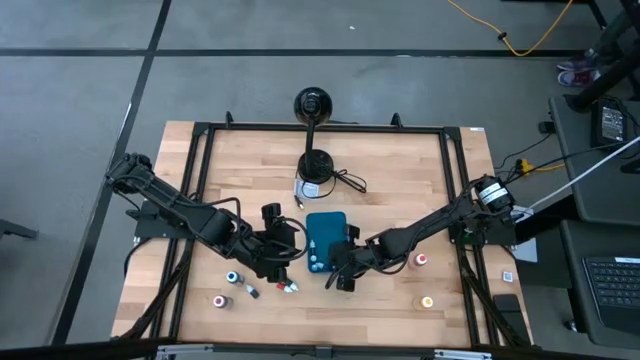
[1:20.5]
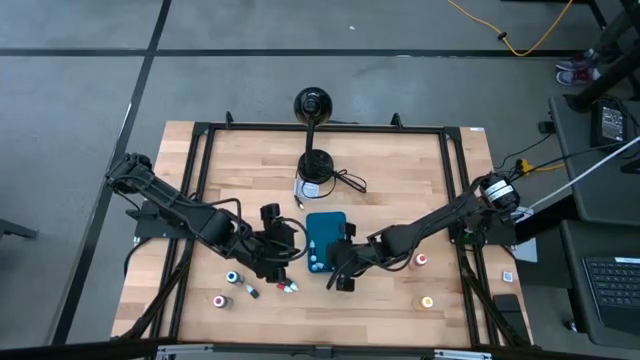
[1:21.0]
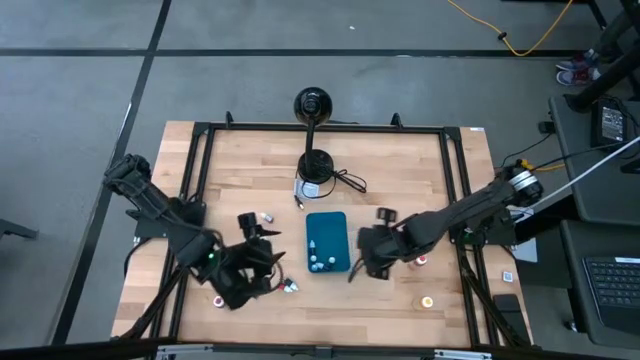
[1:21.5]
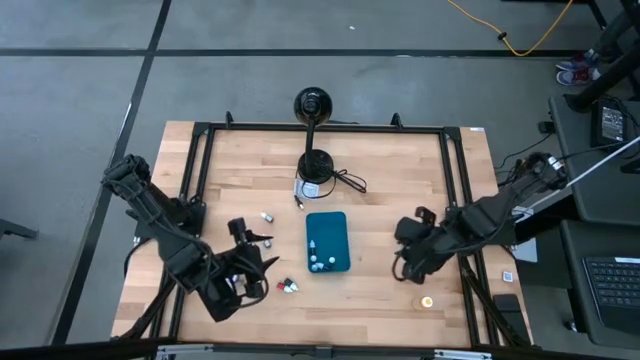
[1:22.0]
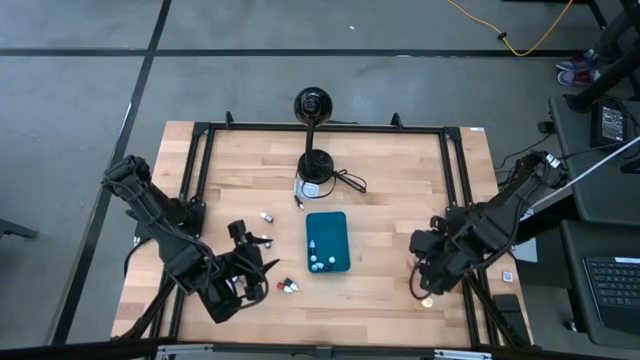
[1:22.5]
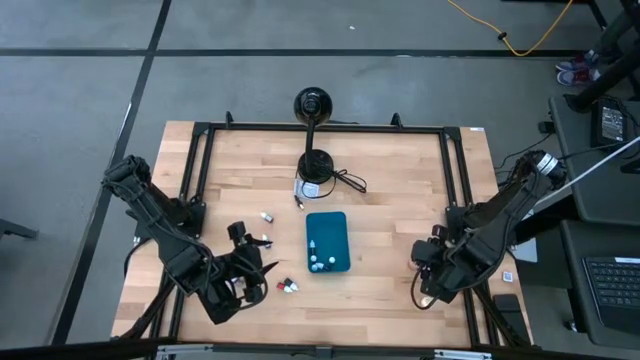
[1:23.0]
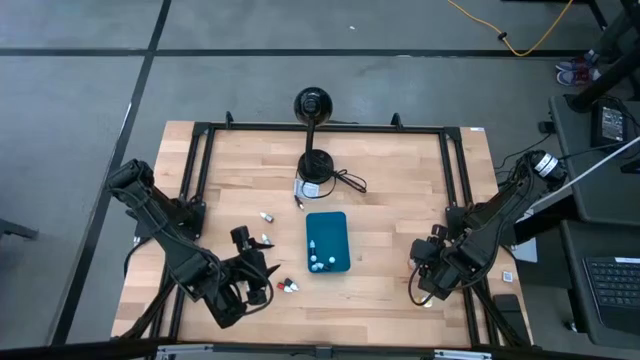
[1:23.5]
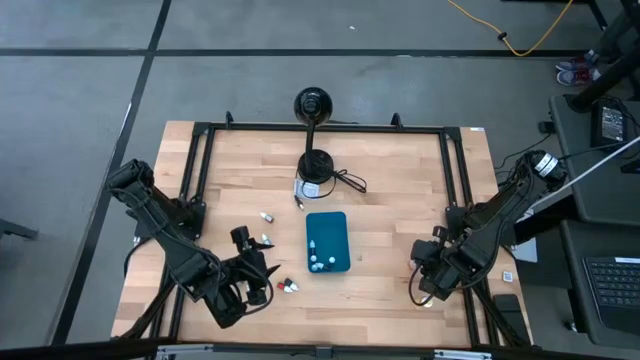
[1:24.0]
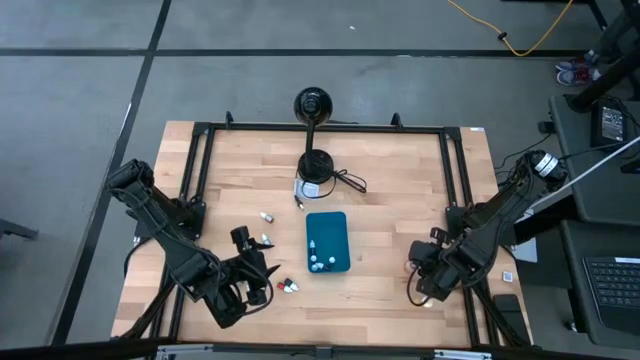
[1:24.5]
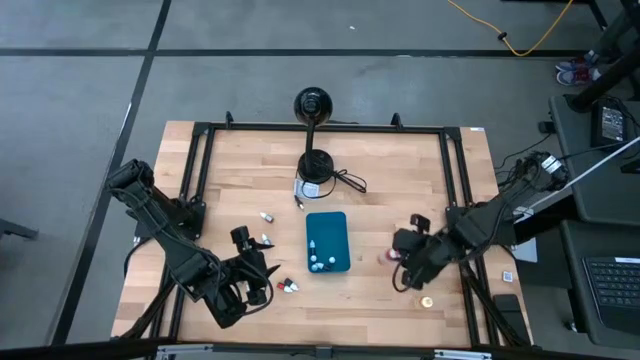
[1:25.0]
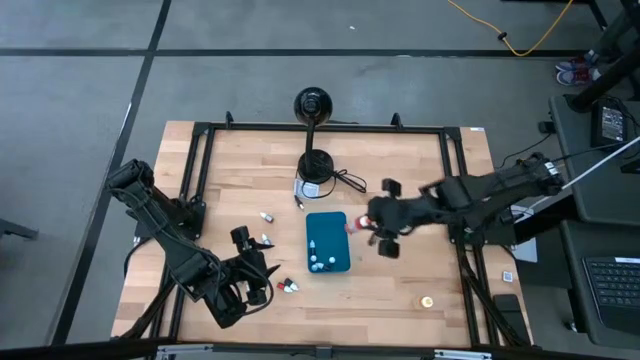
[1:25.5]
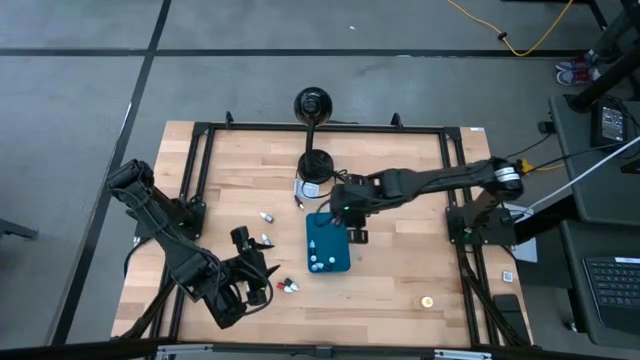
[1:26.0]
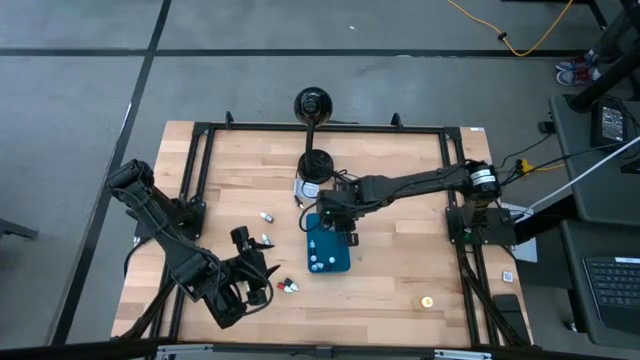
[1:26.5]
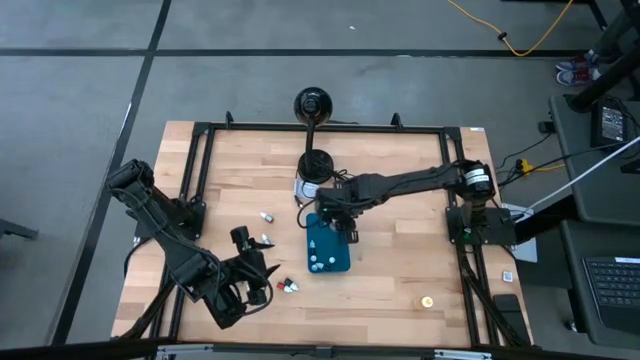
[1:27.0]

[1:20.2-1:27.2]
Task: Pick & Place food coloring
Put the orange big food coloring bottle into the bin

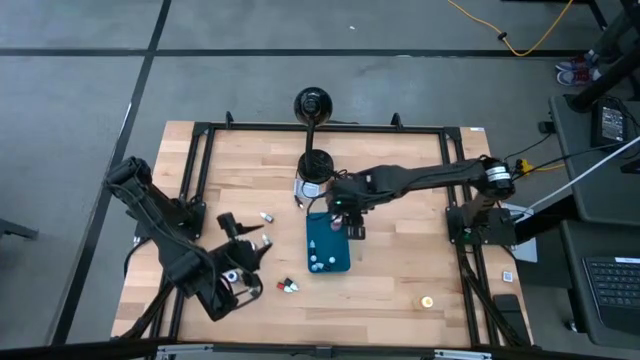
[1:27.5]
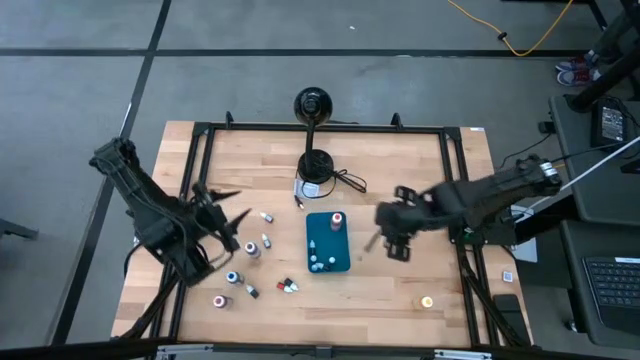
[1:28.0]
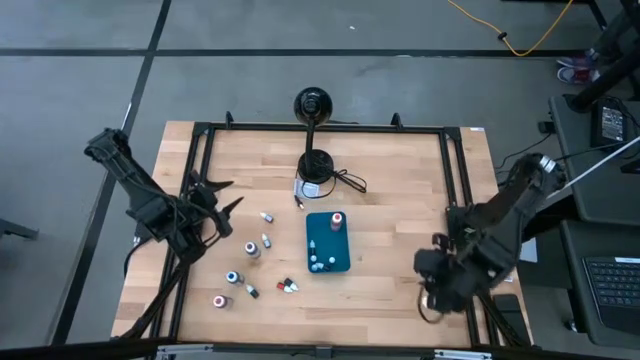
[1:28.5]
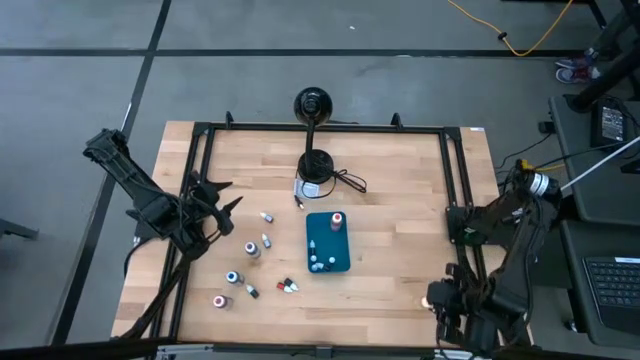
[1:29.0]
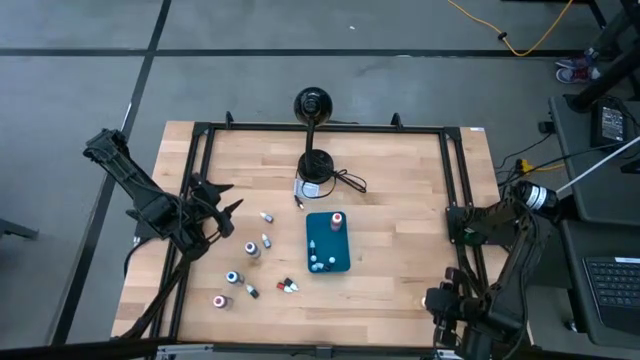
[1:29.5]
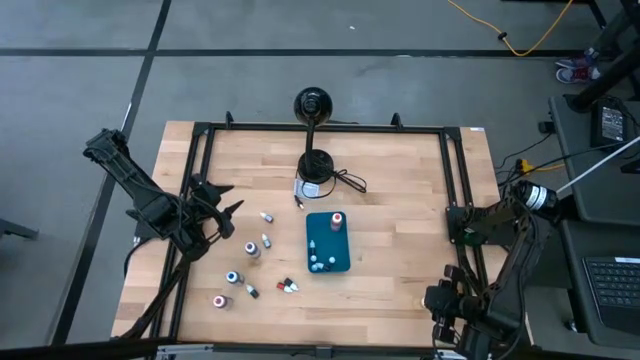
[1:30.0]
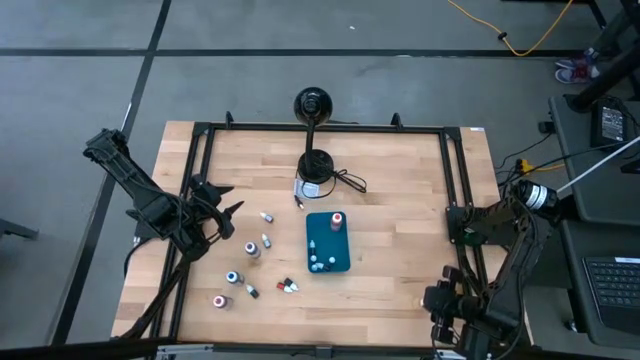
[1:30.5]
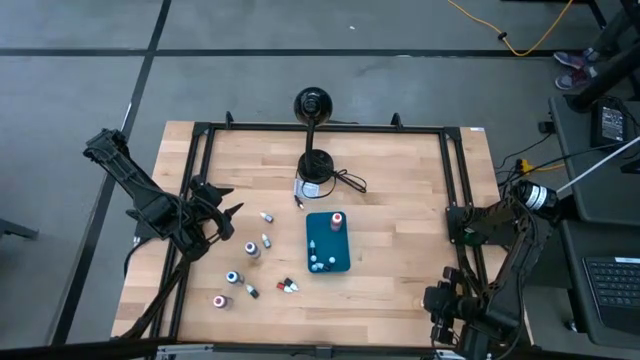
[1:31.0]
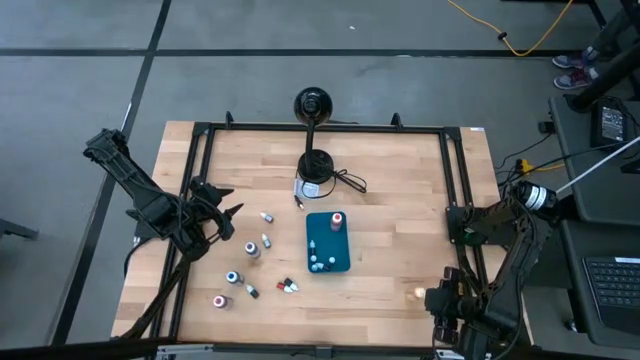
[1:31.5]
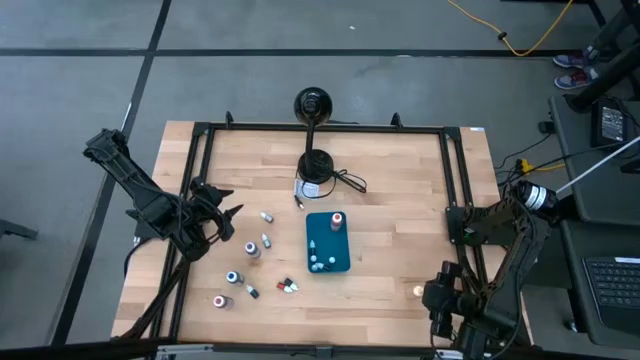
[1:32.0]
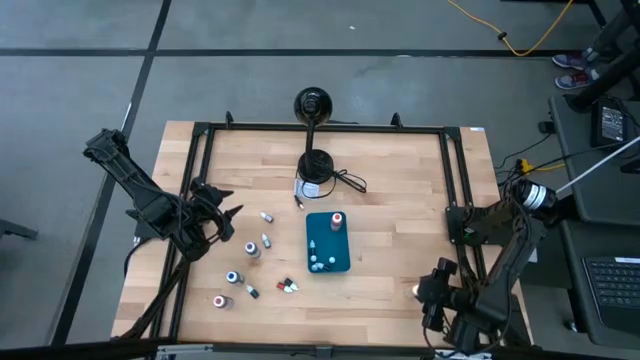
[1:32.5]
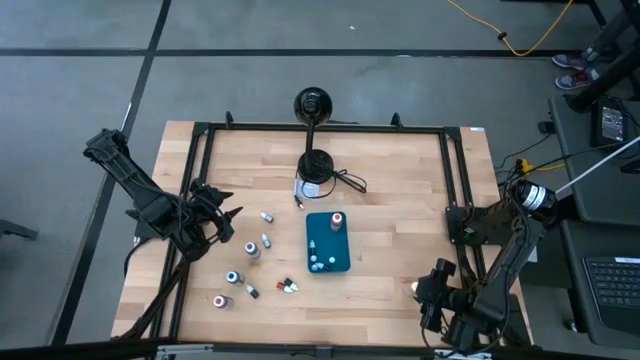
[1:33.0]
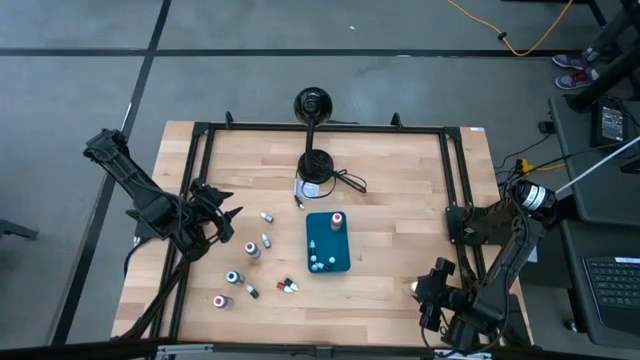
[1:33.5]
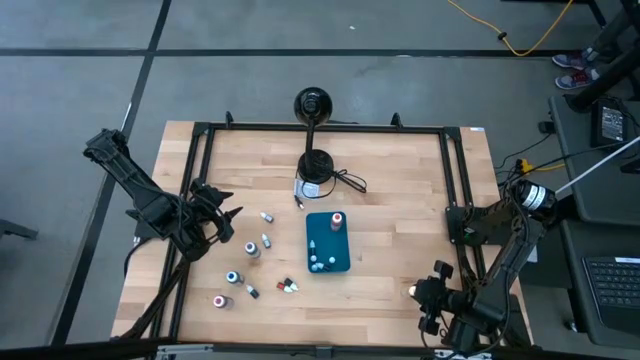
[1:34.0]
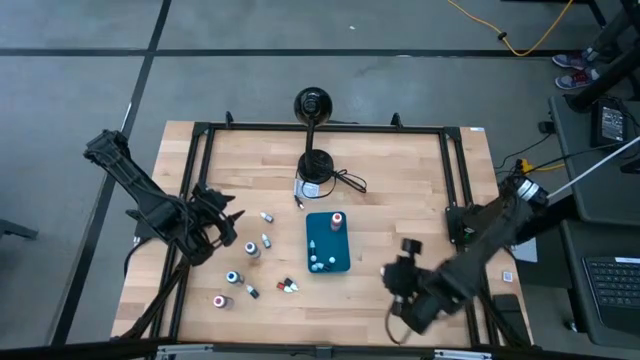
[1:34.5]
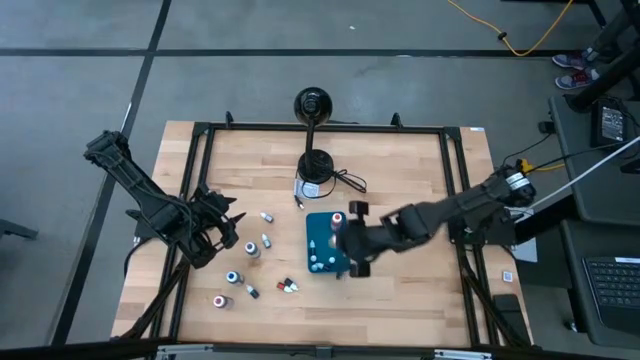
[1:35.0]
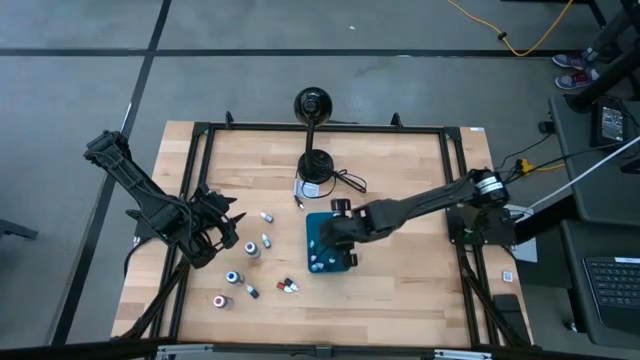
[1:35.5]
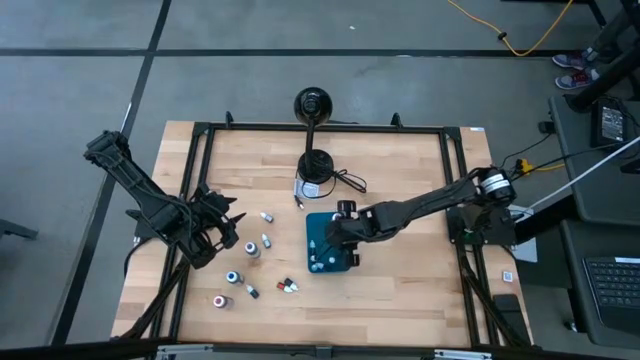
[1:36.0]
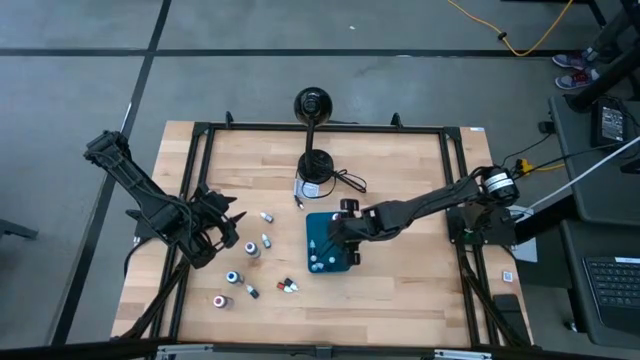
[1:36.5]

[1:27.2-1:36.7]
Put the yellow big food coloring bottle into the bin

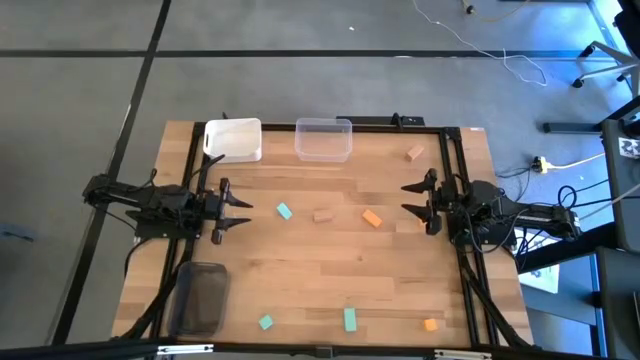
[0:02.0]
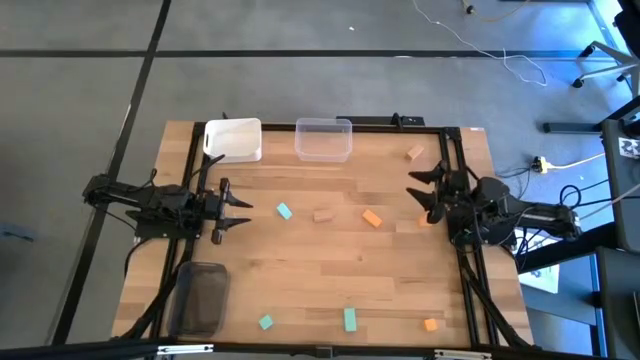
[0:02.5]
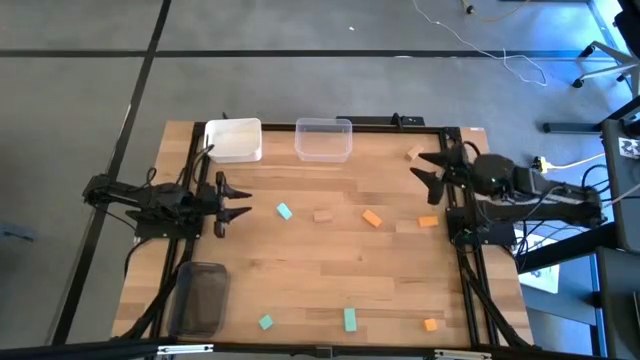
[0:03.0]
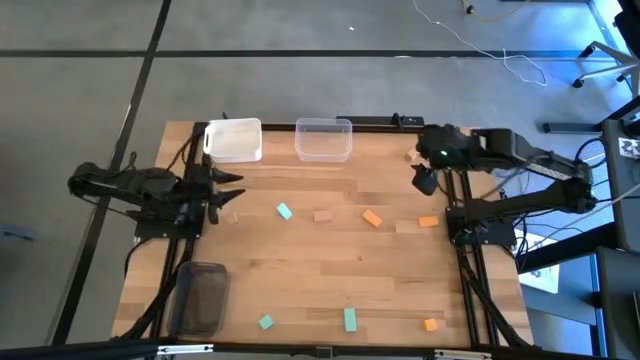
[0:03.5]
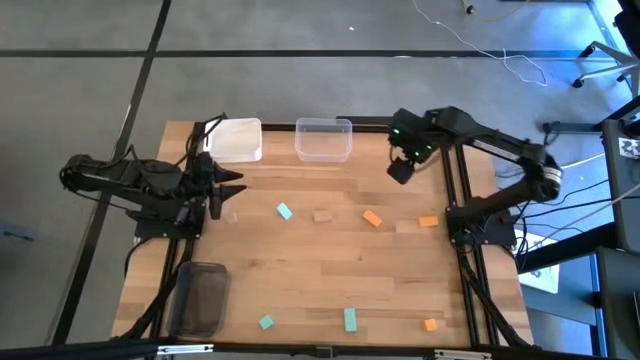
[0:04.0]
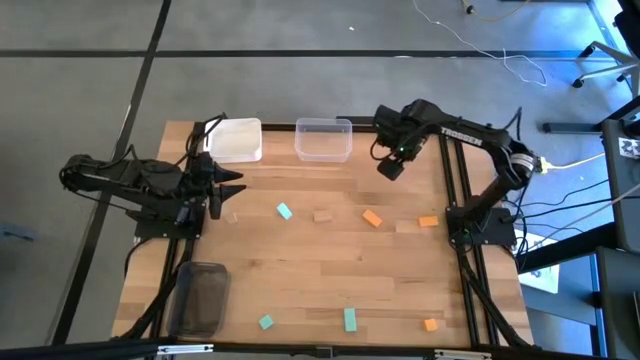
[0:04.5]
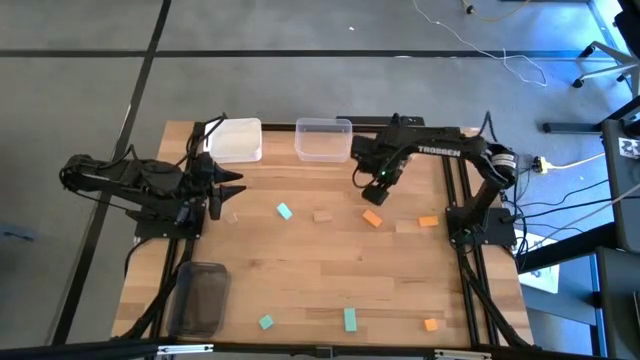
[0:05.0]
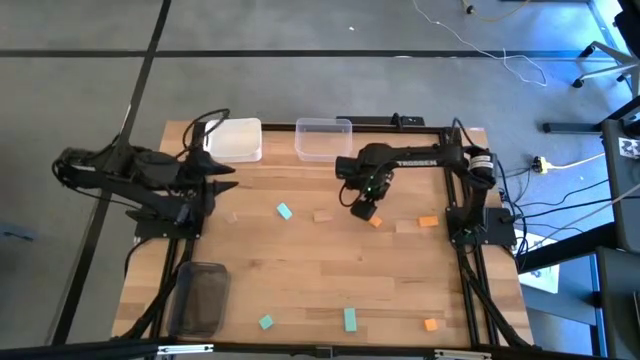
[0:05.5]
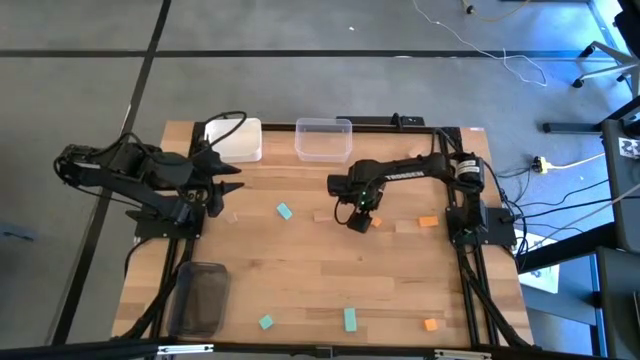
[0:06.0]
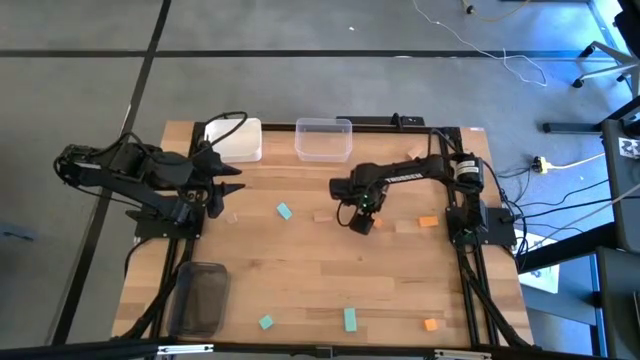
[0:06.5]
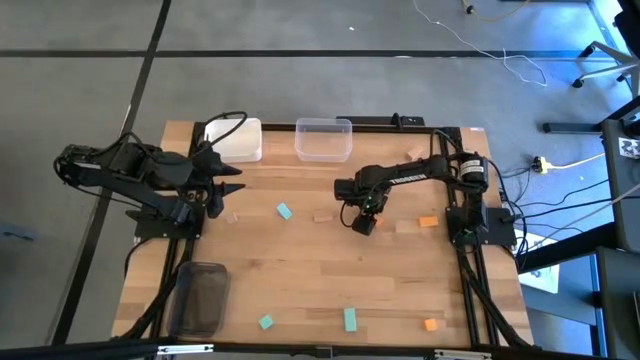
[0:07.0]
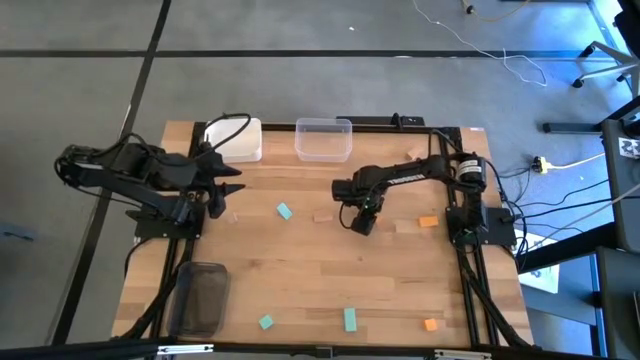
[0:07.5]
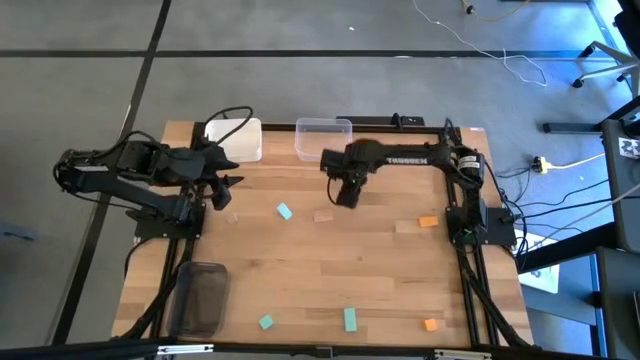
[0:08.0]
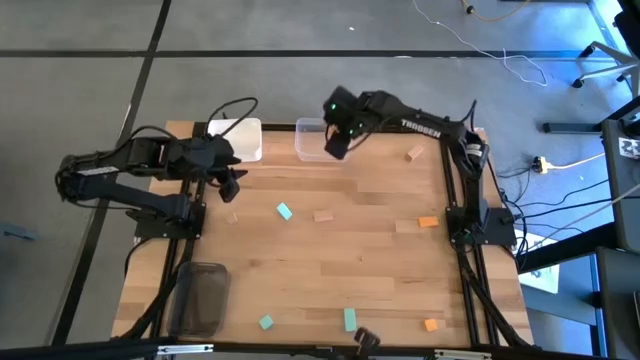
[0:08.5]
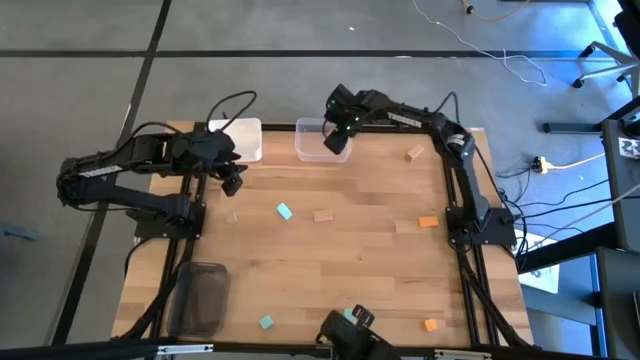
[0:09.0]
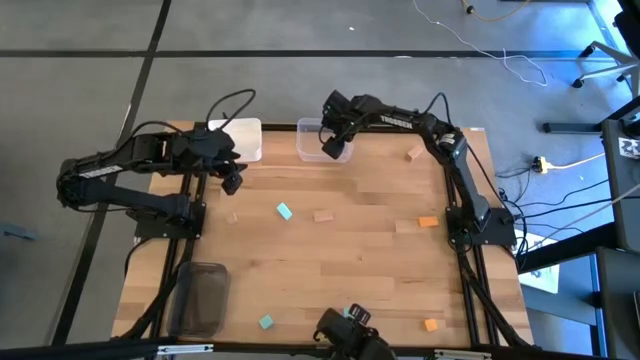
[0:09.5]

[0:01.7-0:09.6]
Task: Sort & place blocks by color
Put the top left orange block into the transparent bin
